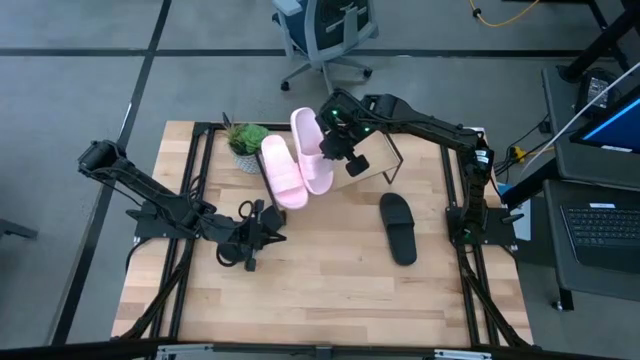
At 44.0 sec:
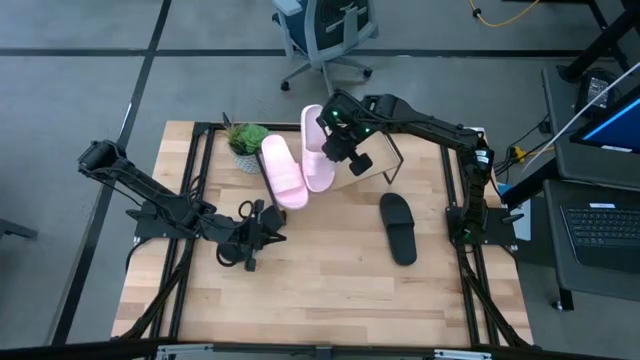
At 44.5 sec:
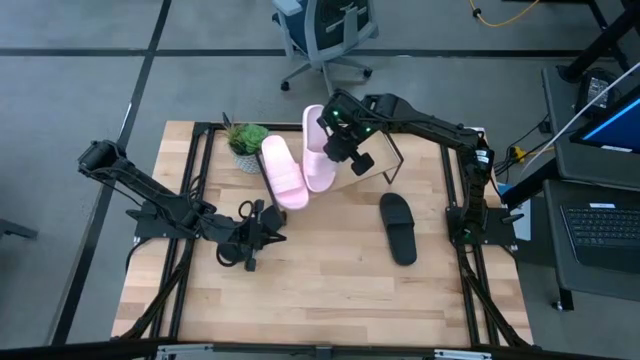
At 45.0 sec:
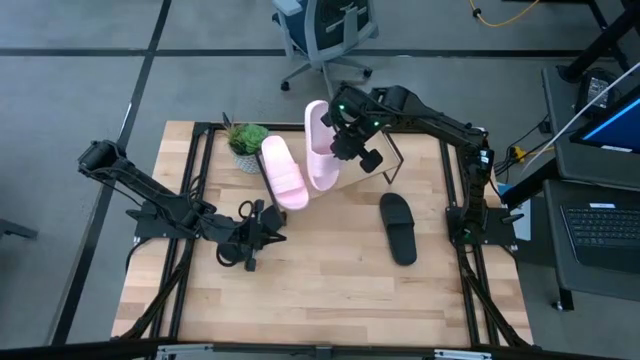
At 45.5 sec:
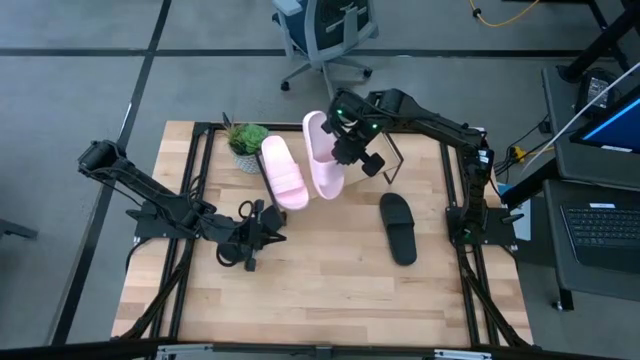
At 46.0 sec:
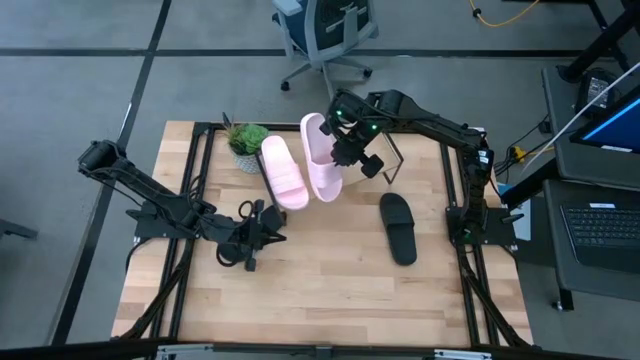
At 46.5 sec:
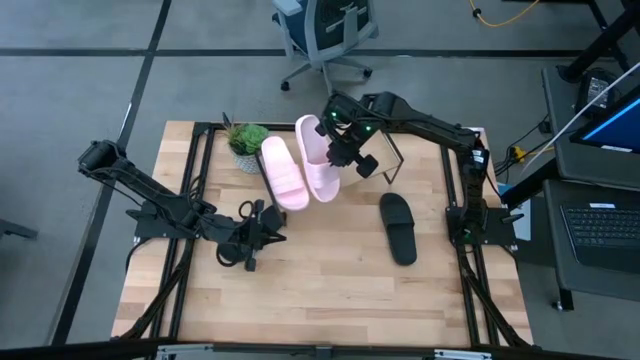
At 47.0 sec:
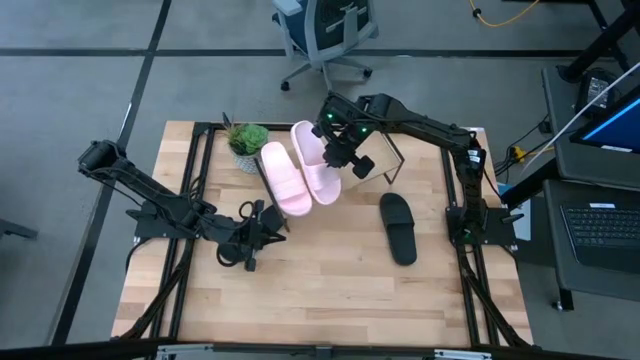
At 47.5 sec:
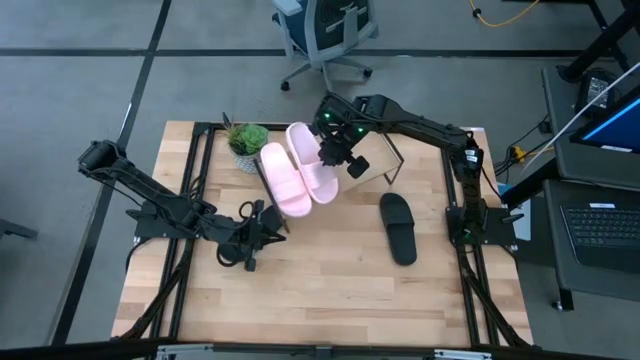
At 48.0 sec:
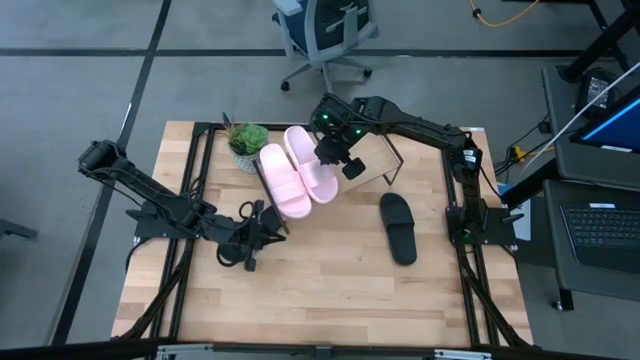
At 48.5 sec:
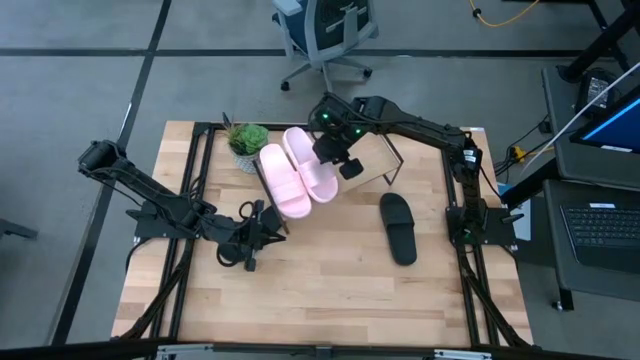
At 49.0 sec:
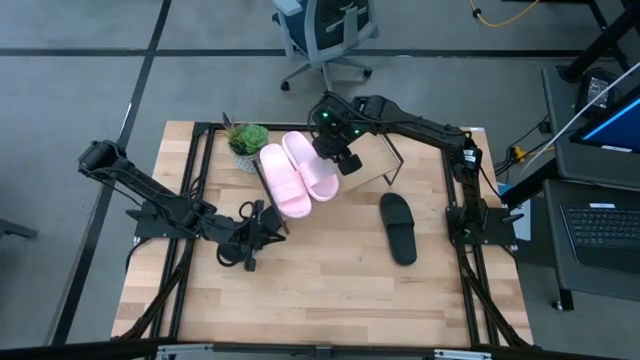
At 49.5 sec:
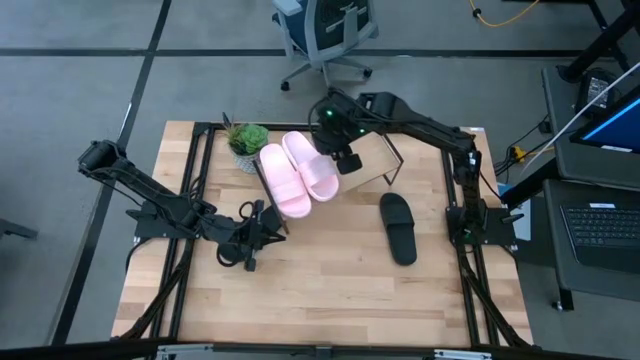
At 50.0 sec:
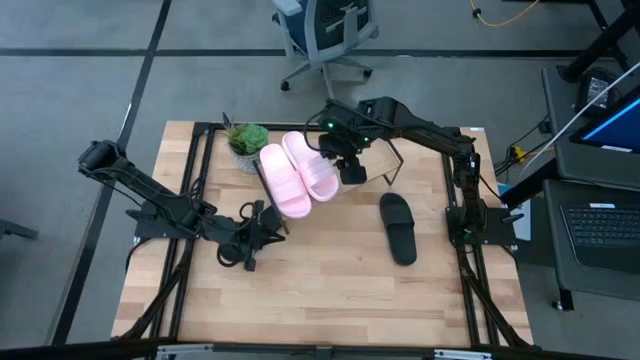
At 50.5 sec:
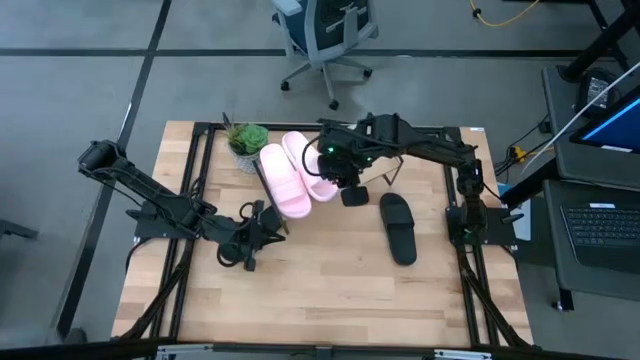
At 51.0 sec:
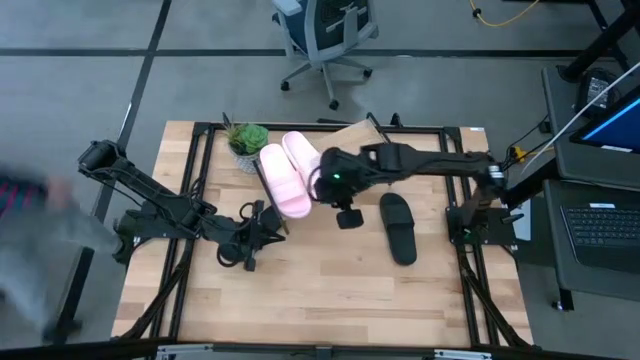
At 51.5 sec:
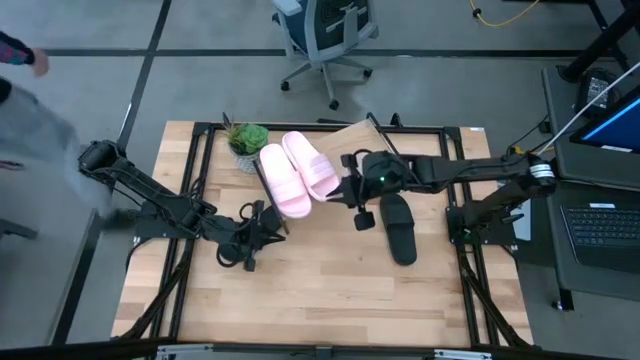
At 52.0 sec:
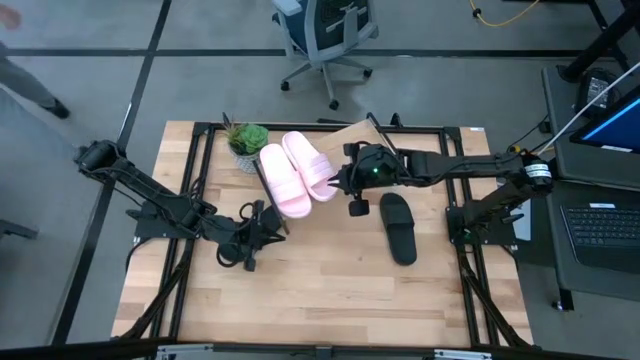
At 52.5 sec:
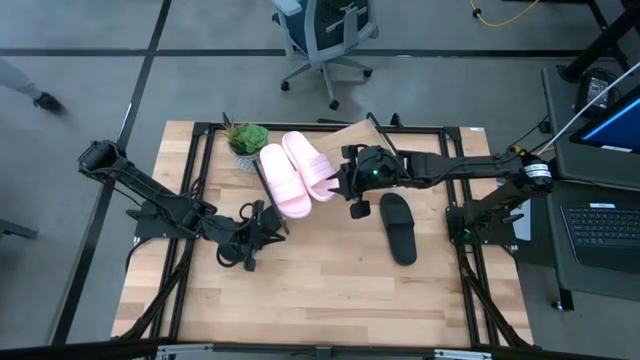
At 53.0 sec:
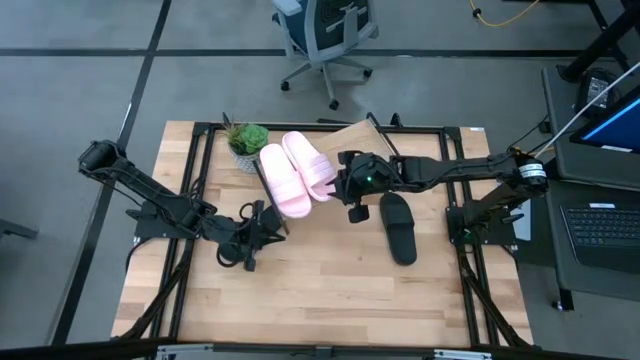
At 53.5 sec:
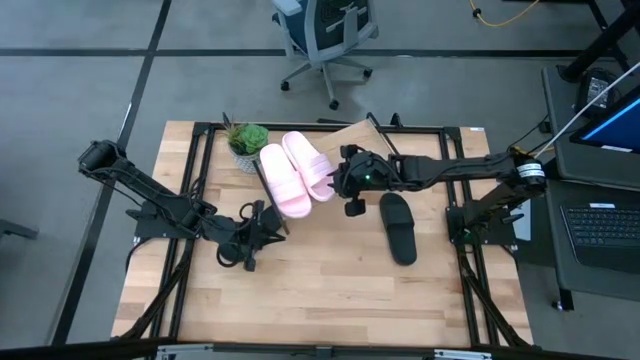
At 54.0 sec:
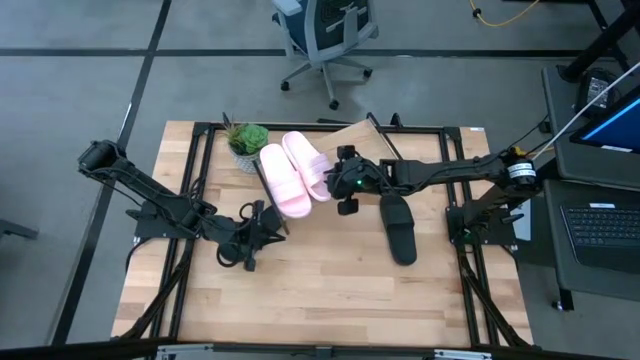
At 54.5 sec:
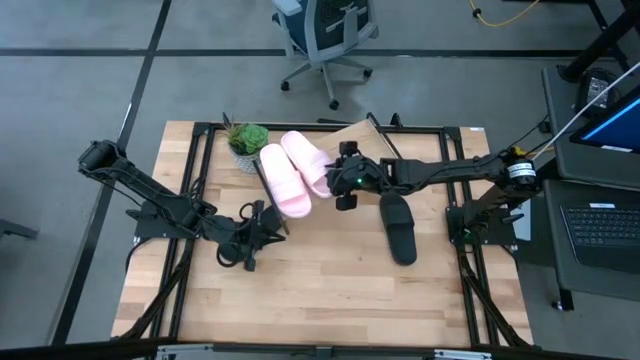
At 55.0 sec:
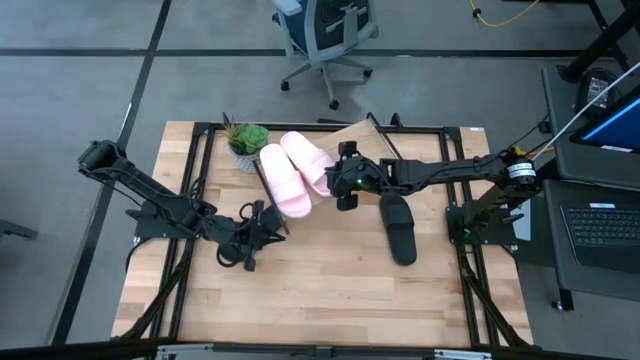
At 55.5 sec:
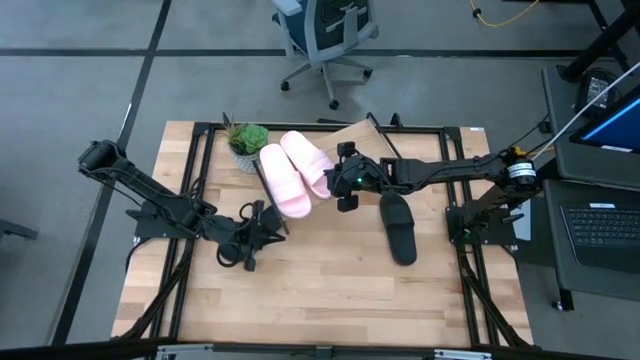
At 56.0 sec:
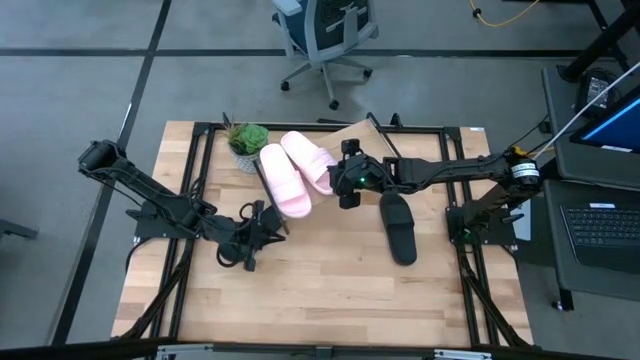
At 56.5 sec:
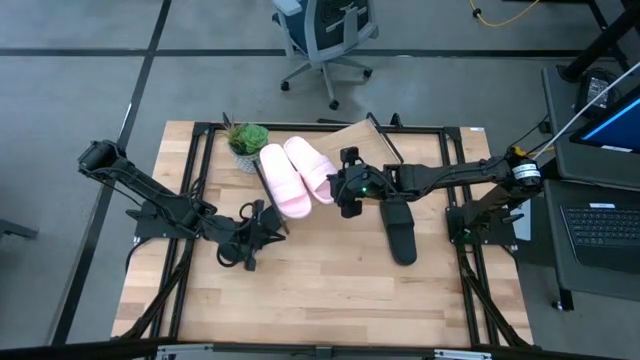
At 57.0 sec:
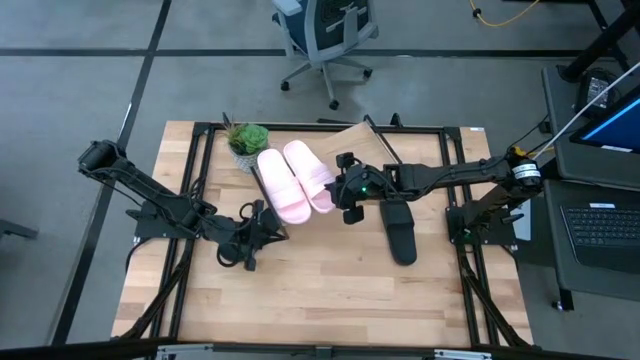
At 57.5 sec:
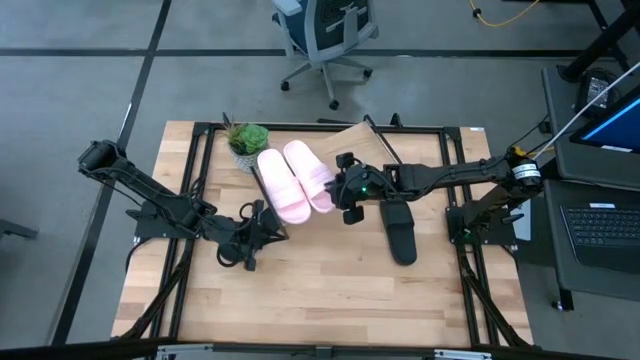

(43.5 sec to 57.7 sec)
Task: Pick and place slides into the shelf
Put the pink slide on the shelf

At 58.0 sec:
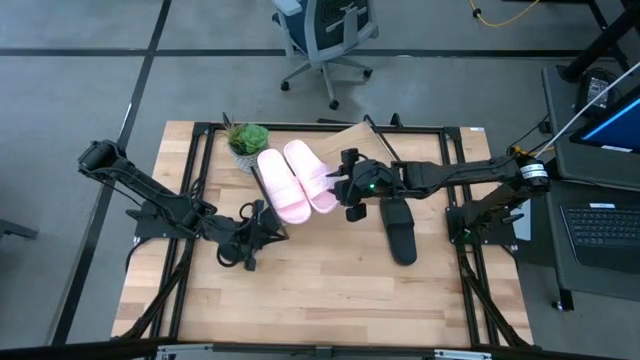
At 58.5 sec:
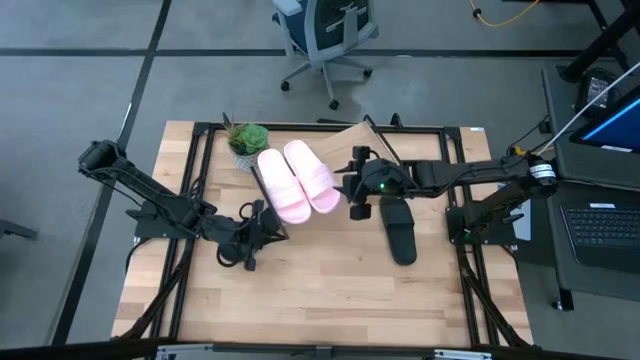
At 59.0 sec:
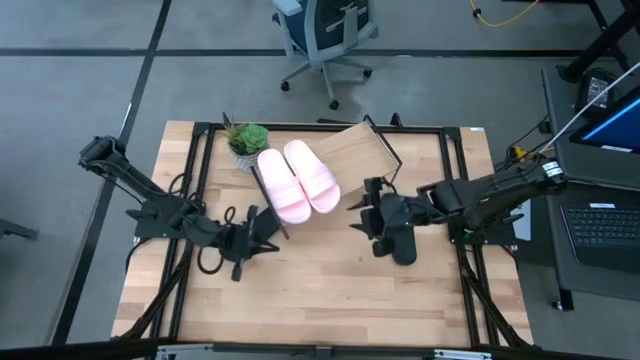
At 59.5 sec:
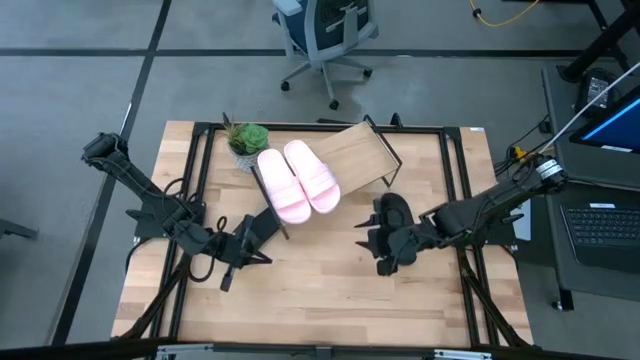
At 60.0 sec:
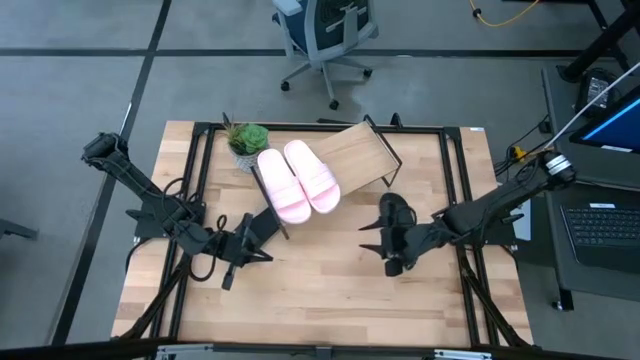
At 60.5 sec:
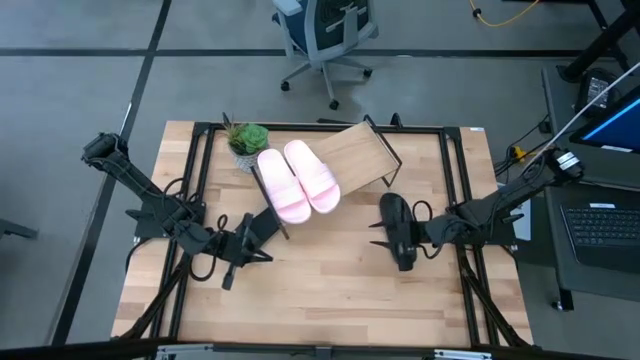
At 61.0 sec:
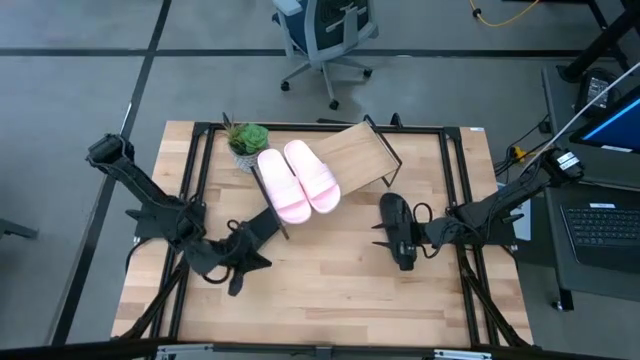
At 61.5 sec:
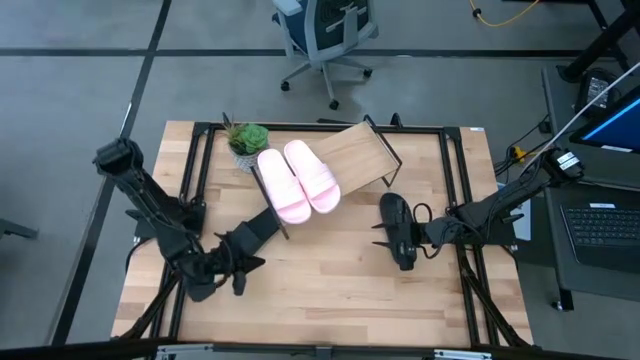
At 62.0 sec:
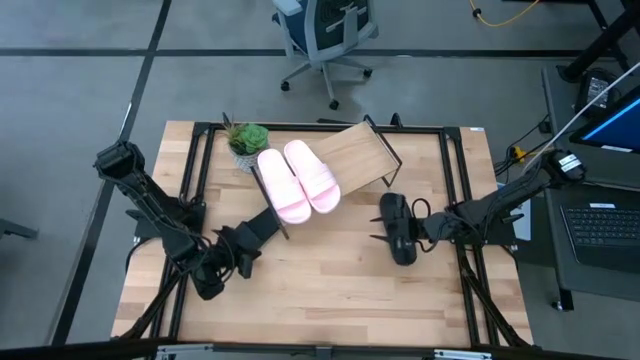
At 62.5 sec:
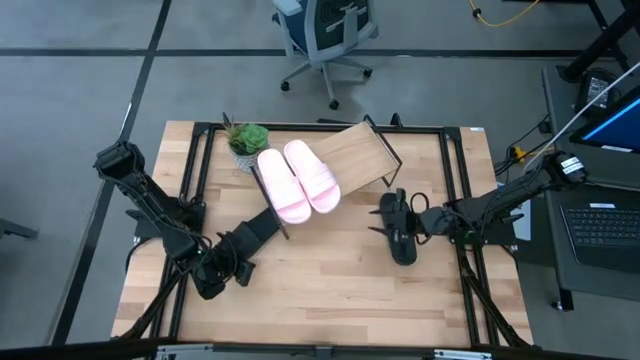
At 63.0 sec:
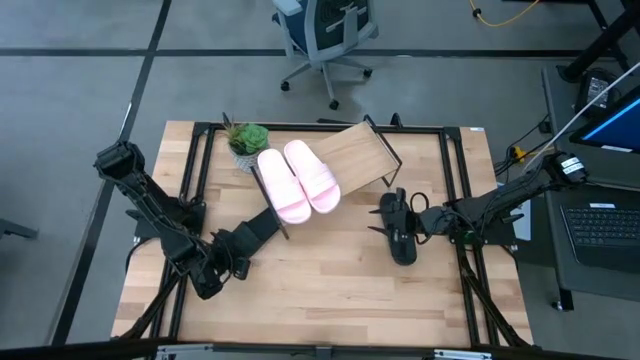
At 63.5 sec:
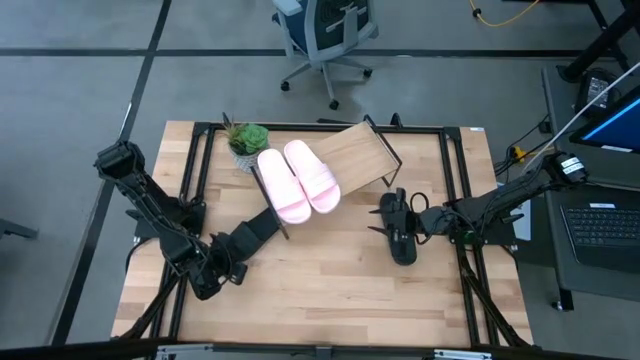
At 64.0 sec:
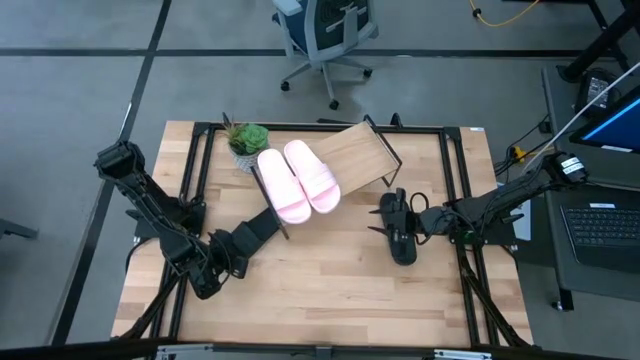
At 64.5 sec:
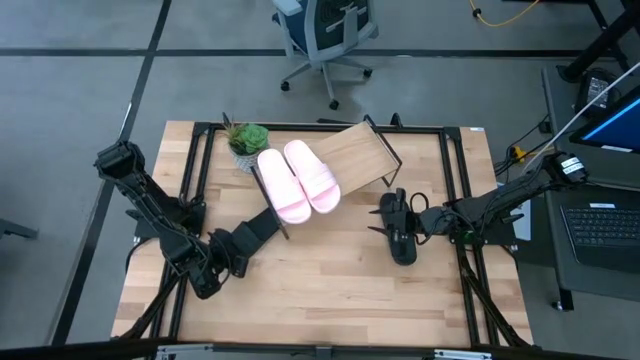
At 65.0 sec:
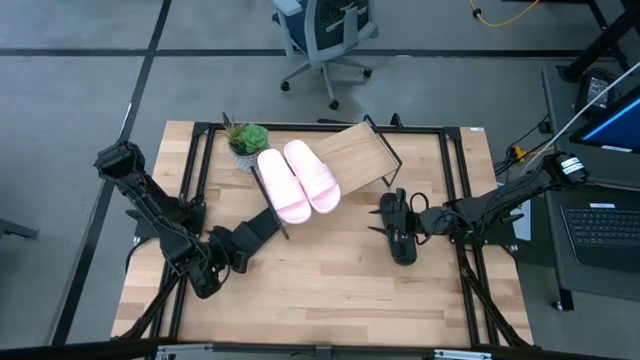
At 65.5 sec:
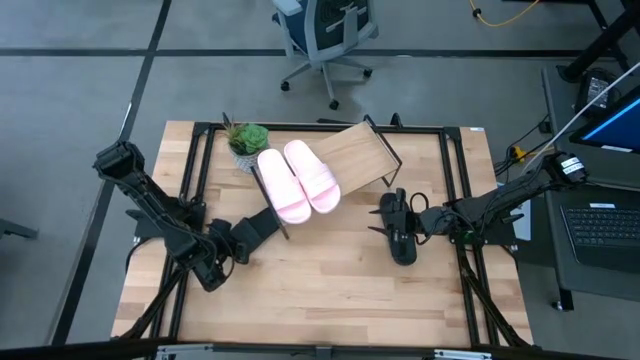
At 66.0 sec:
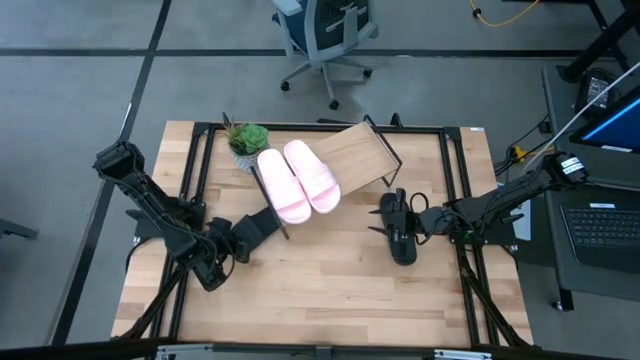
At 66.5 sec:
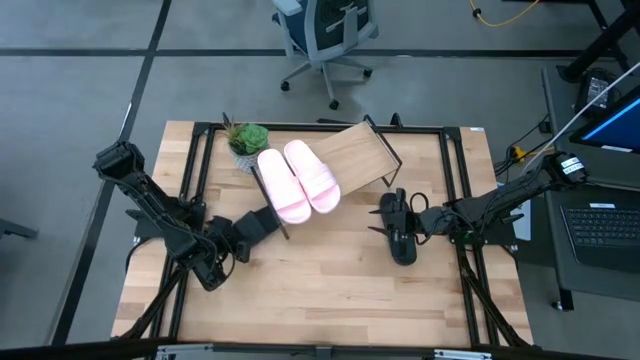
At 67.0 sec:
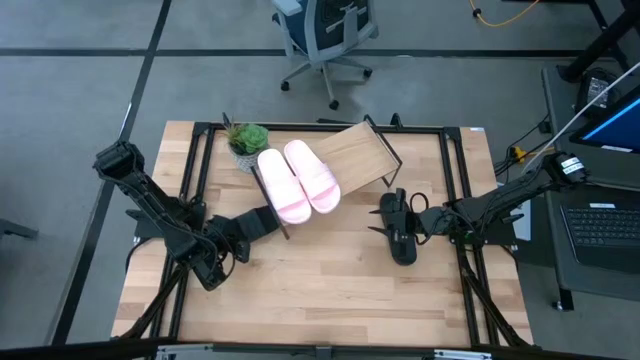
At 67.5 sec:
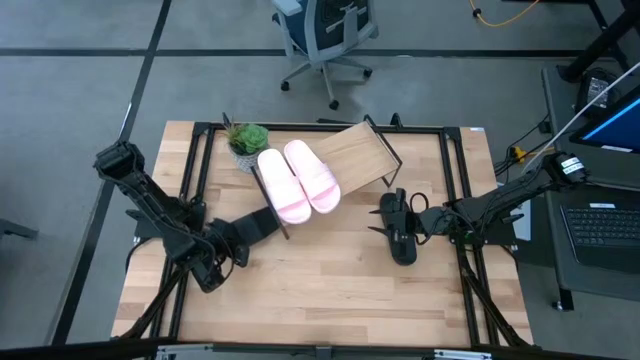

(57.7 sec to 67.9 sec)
Put the left black slide on the shelf
